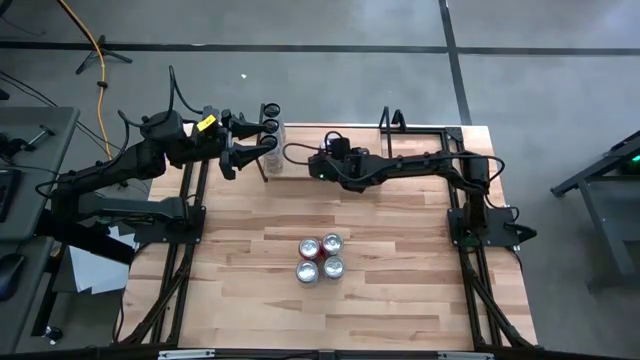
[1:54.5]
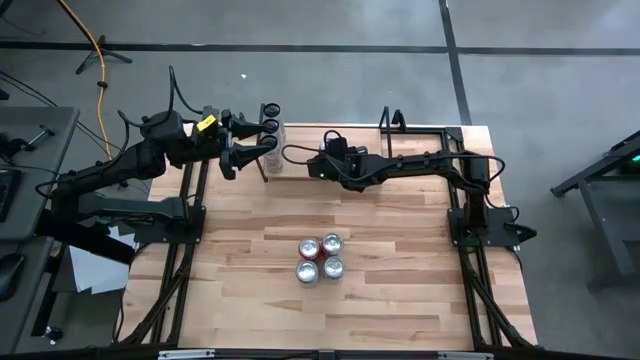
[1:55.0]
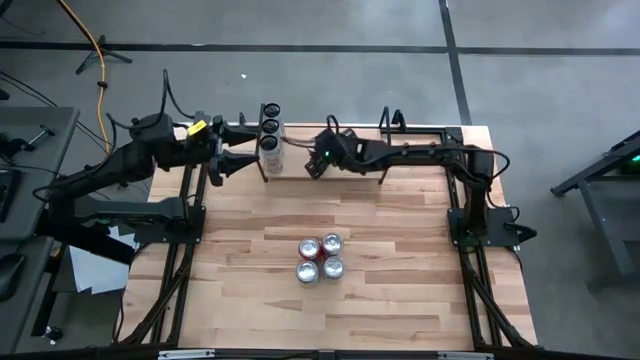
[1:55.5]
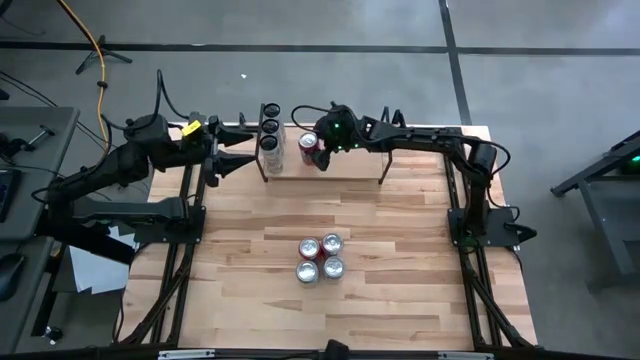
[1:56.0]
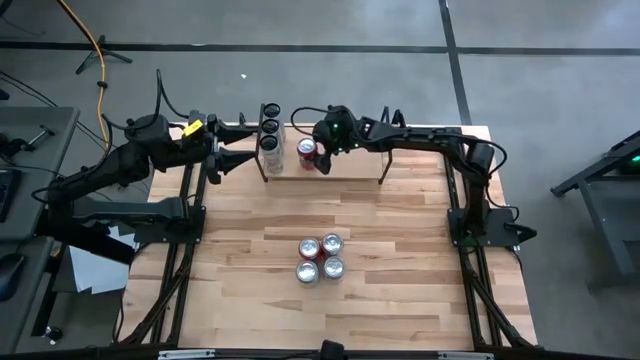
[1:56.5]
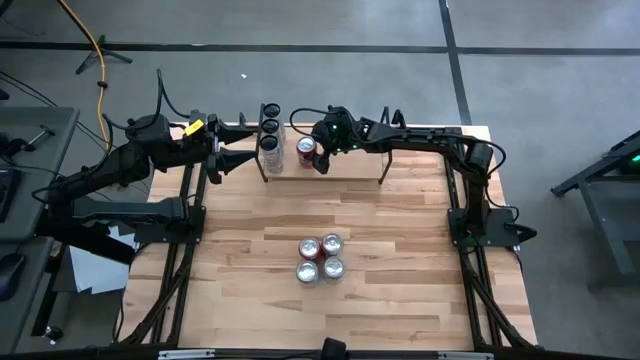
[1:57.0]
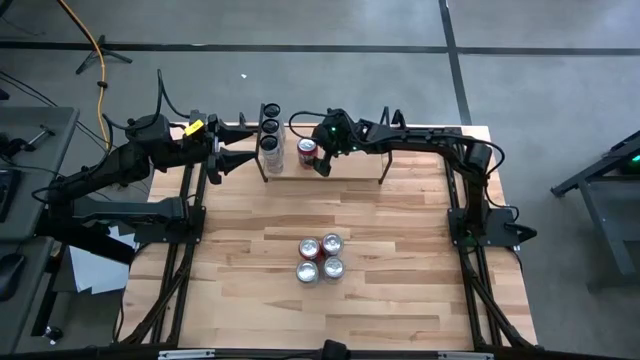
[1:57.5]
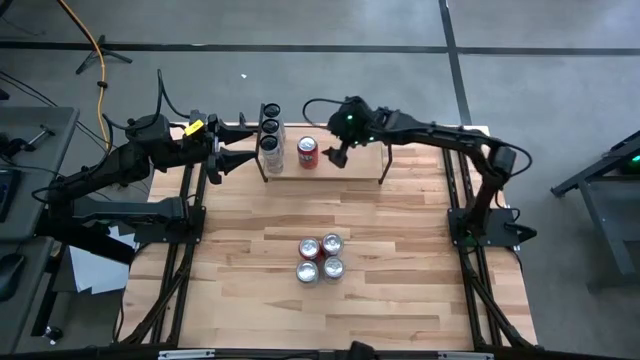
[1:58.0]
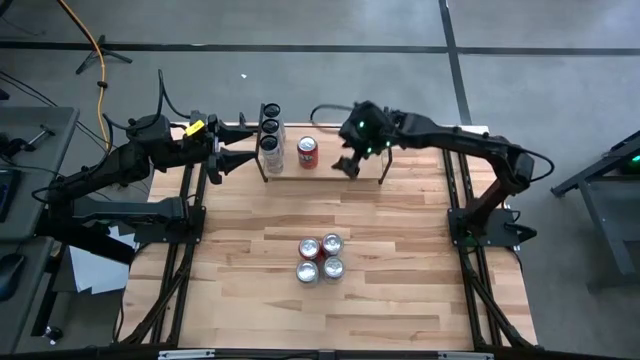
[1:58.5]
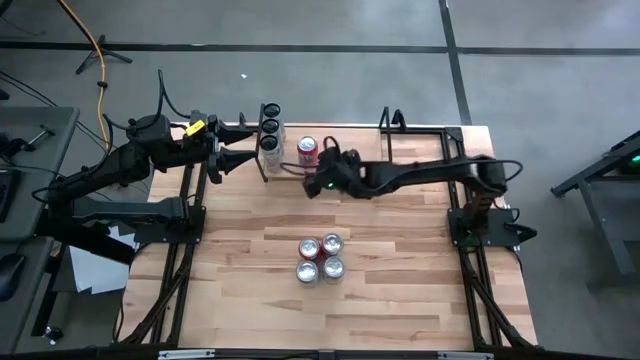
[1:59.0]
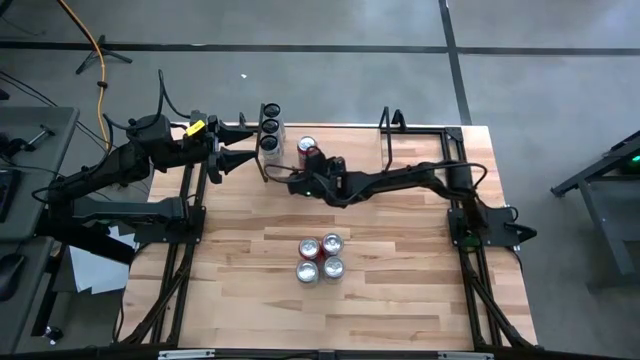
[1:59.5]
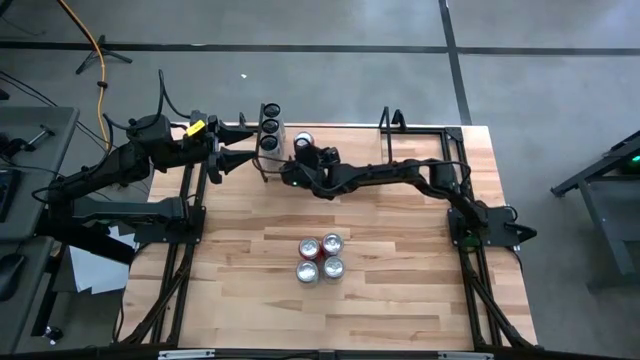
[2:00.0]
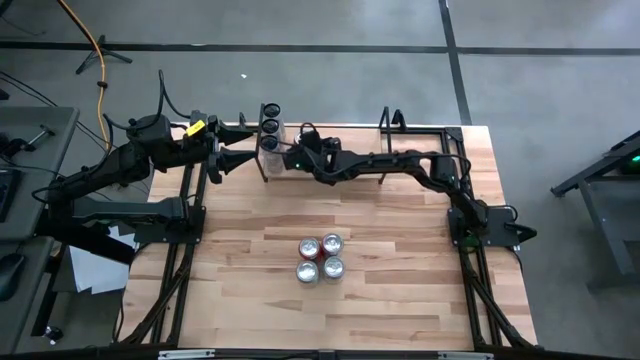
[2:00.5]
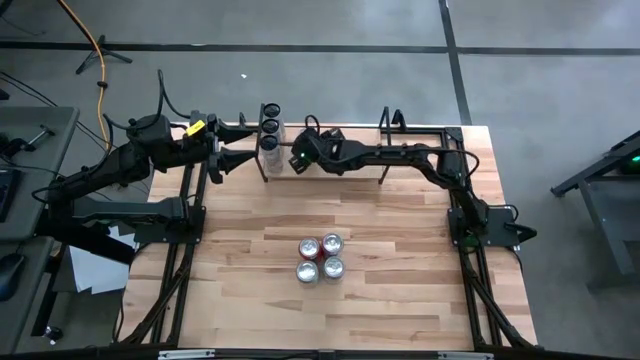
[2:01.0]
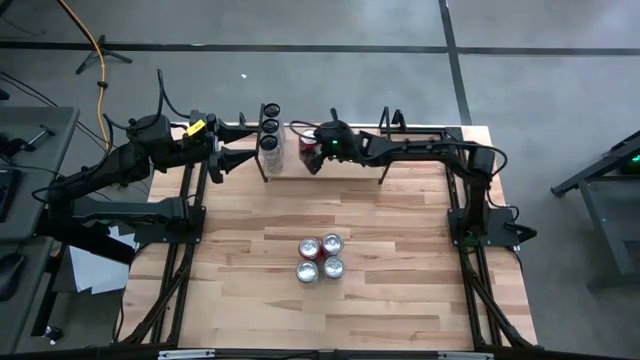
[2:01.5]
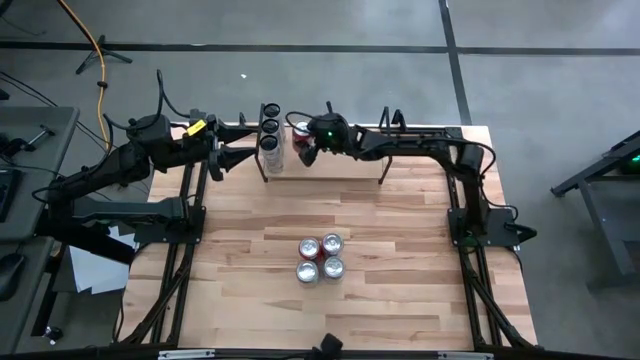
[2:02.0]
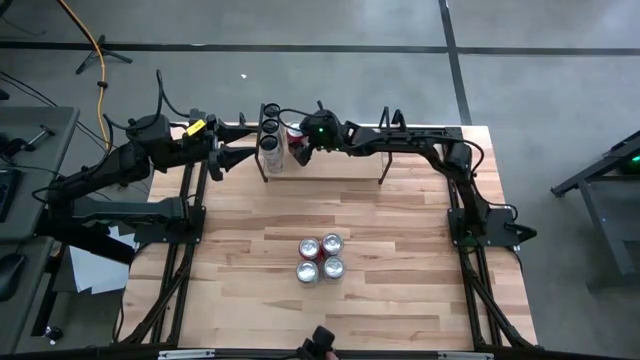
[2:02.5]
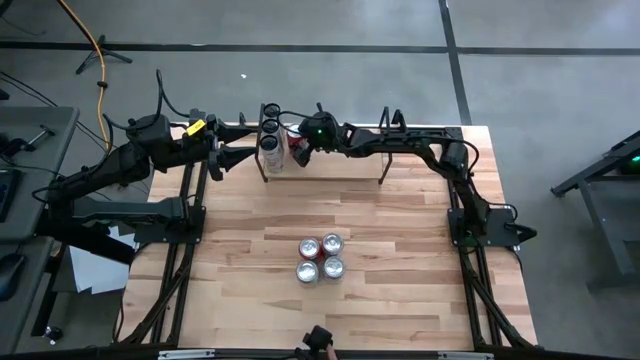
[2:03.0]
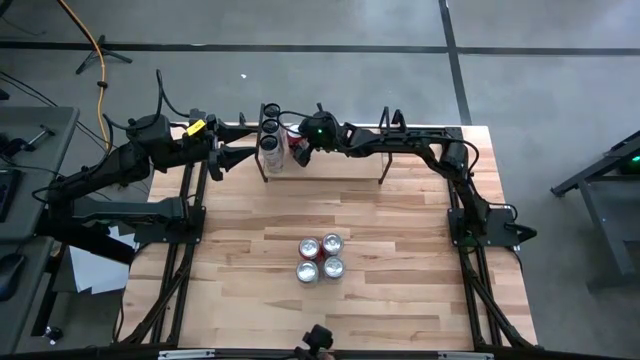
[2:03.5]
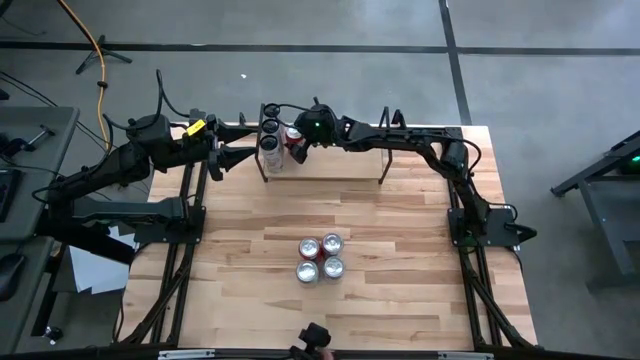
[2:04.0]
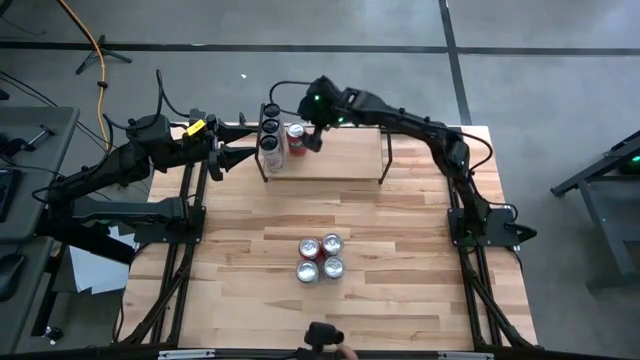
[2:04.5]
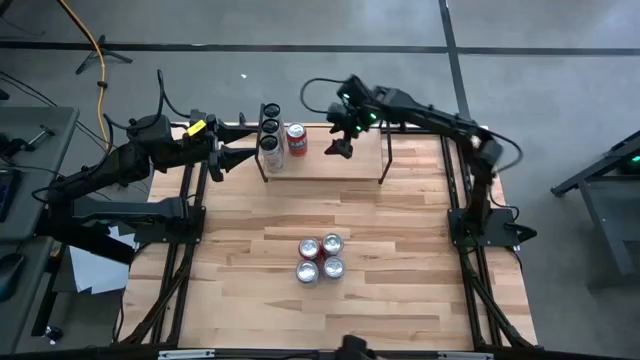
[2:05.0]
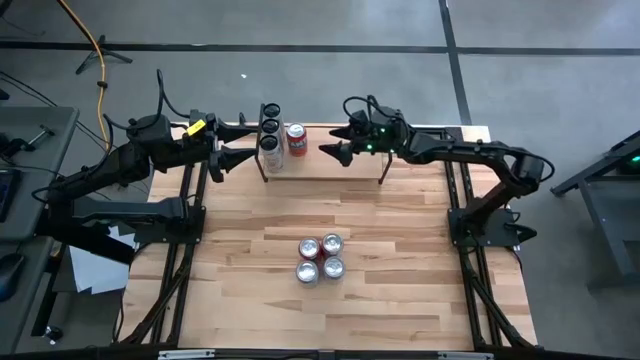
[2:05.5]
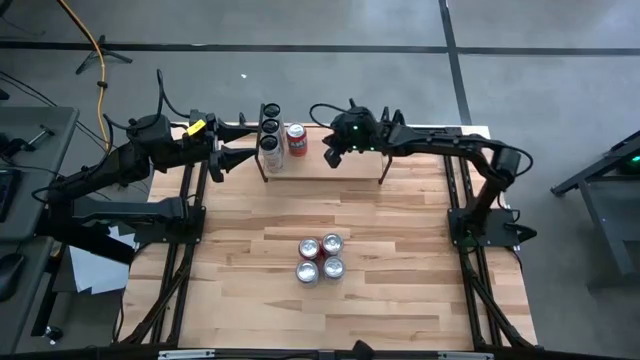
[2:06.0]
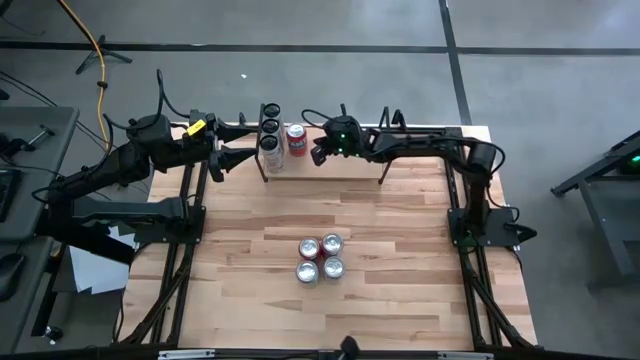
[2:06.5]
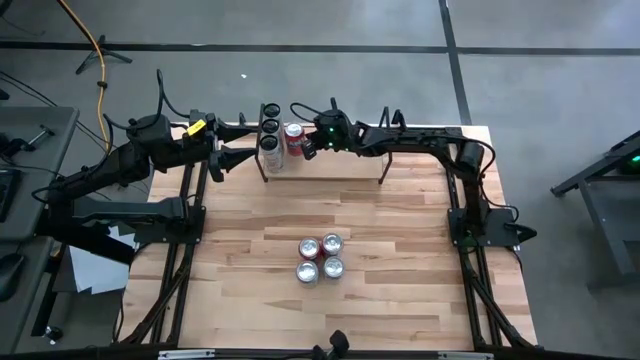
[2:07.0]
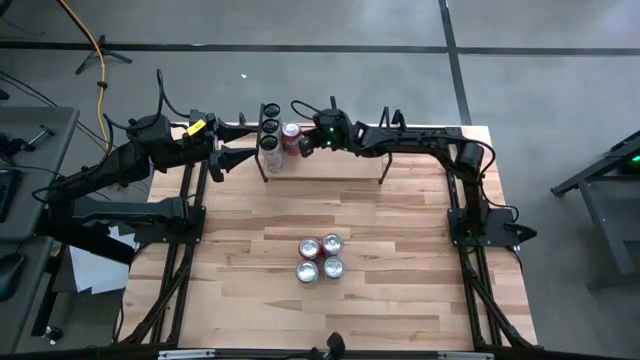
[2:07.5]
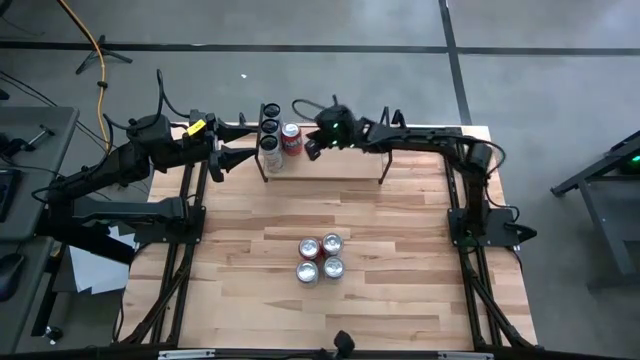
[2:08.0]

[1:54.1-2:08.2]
Task: Place canned beverage on shelf
Put the top orange soda can on the shelf

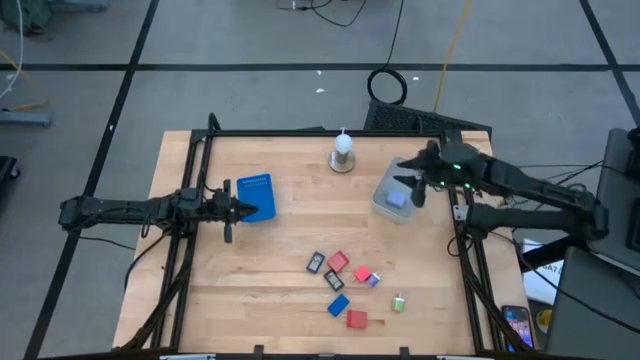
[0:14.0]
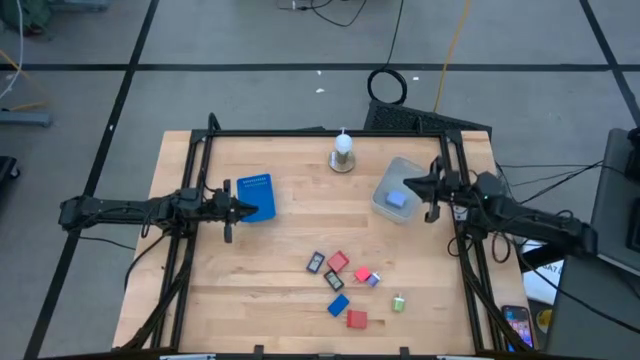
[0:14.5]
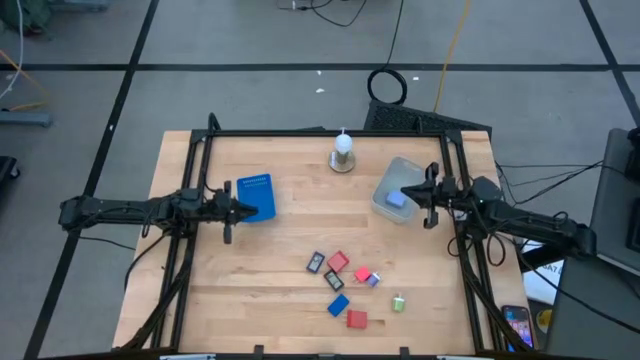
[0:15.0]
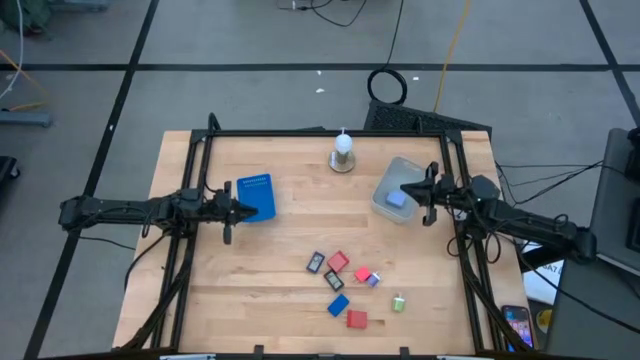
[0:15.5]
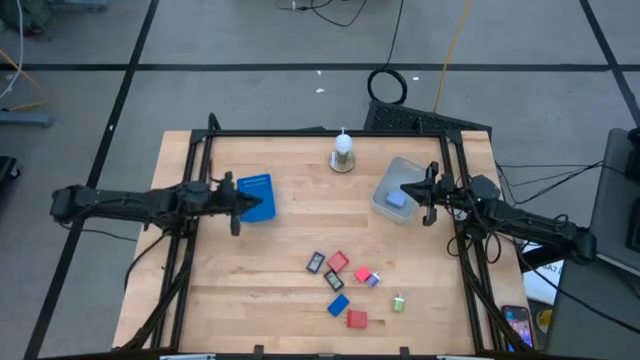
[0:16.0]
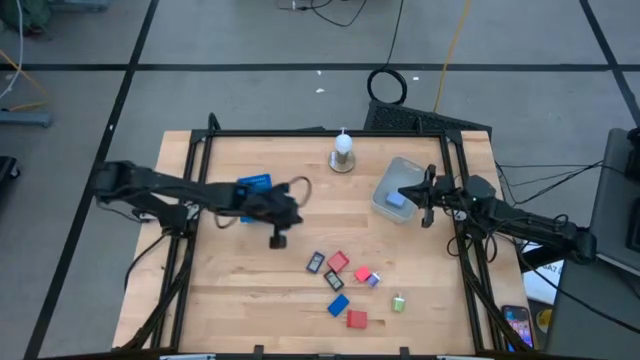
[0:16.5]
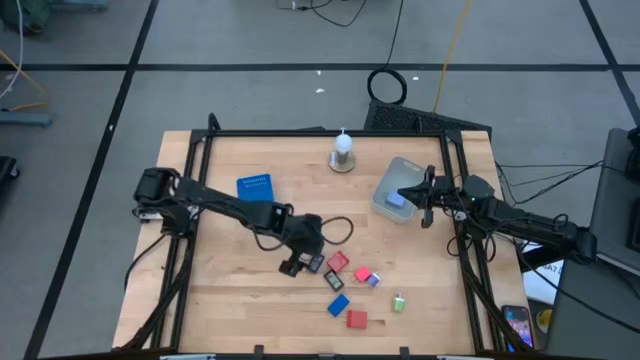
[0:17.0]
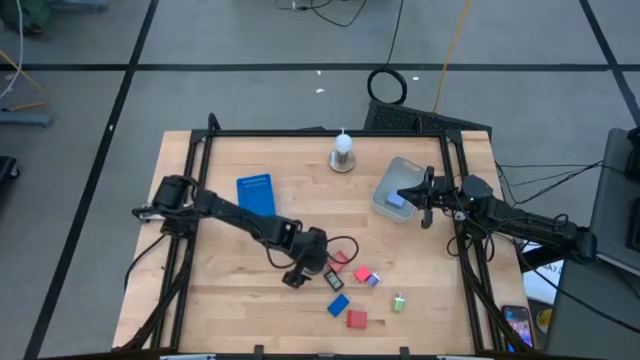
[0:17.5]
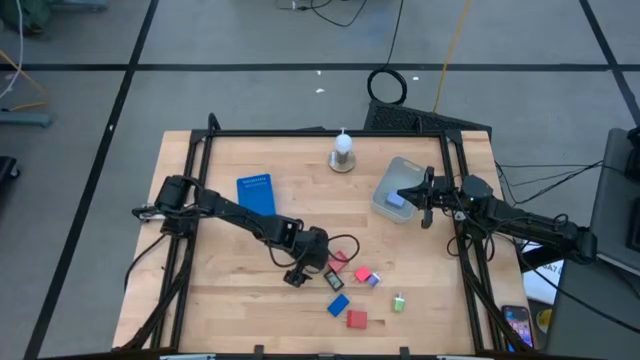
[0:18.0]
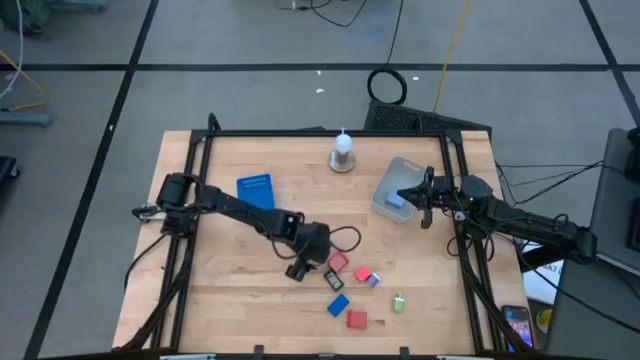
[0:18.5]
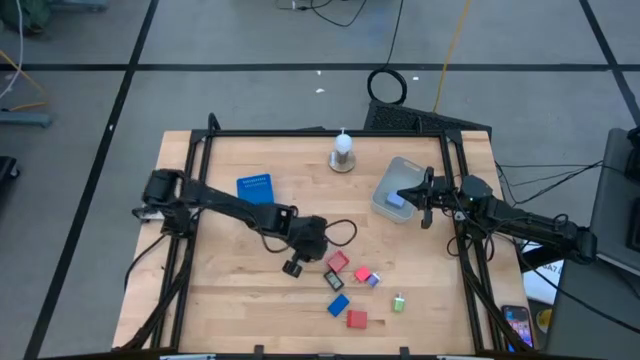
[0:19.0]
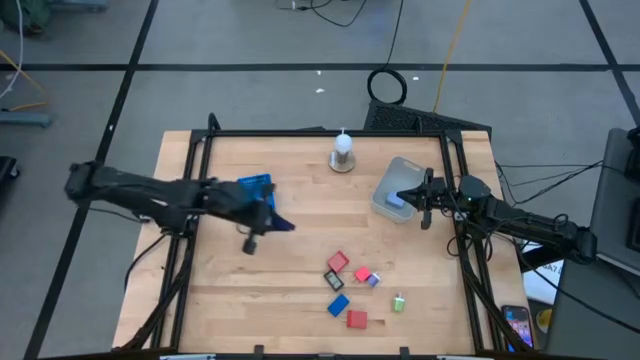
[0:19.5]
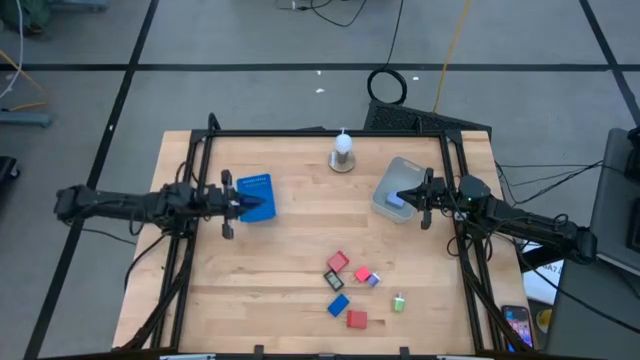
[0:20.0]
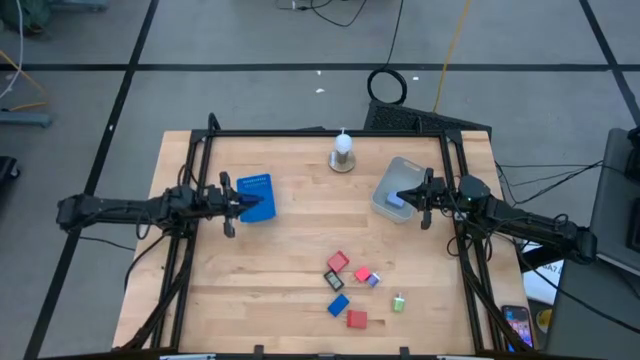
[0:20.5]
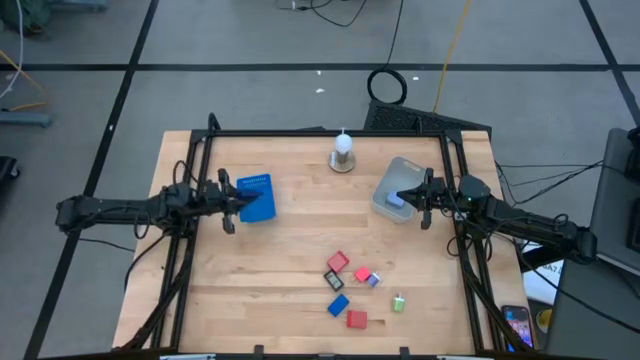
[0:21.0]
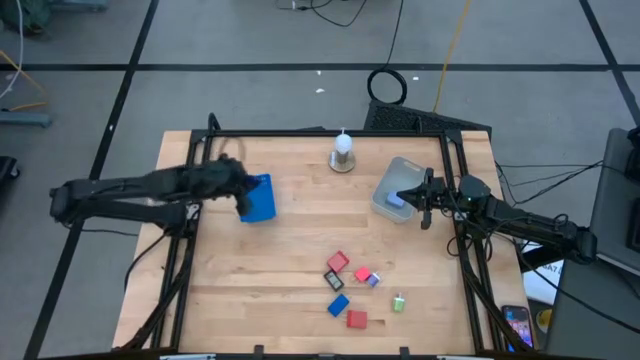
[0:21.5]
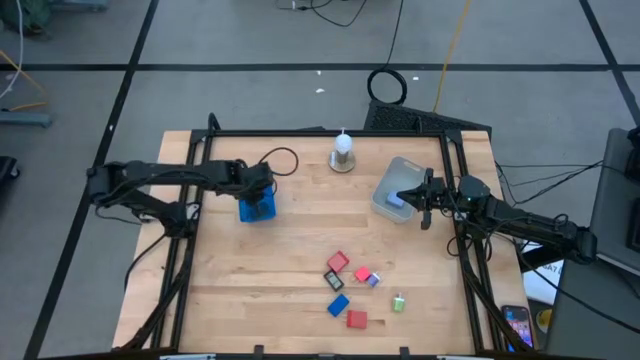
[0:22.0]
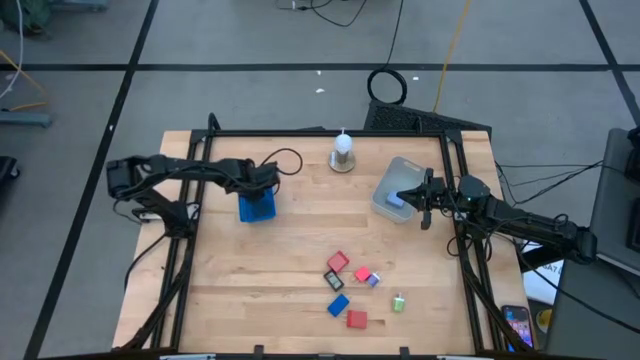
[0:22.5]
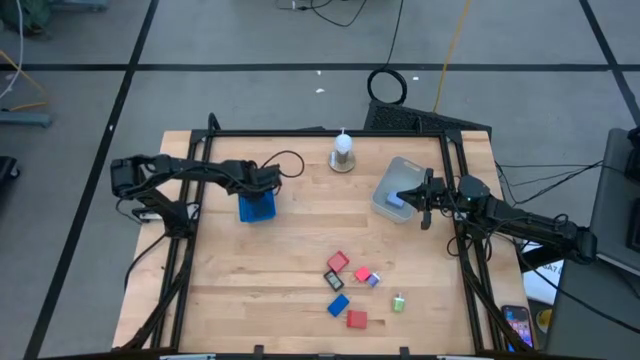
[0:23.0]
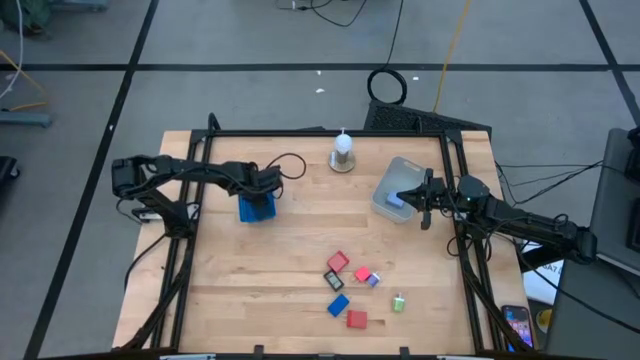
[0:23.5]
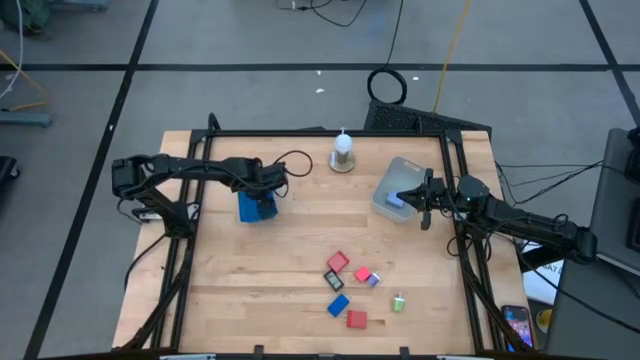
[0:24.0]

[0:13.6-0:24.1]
Task: Pick & Place Office items
Put the dark blue digital clock into the blue bin
